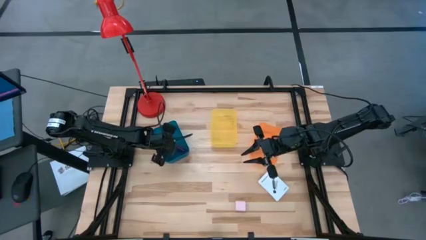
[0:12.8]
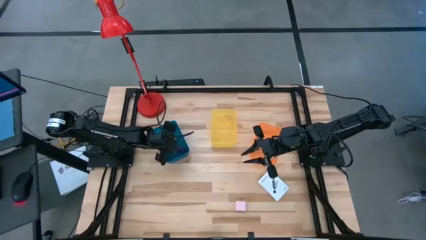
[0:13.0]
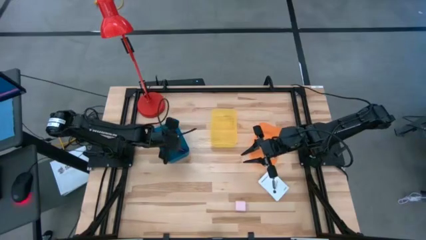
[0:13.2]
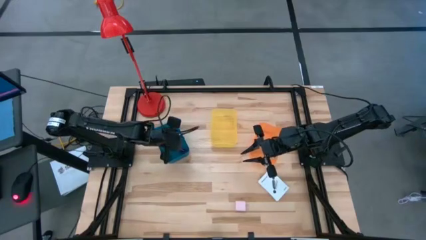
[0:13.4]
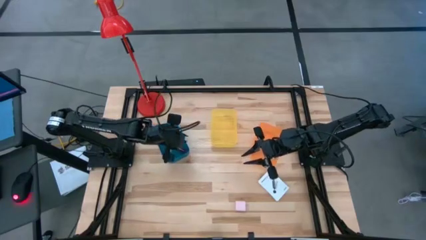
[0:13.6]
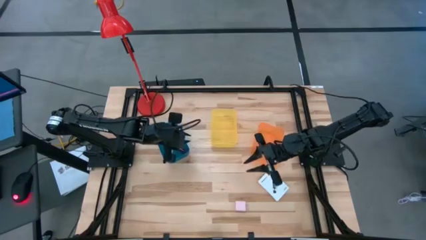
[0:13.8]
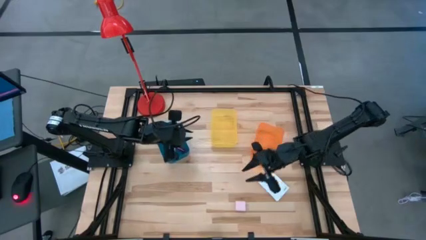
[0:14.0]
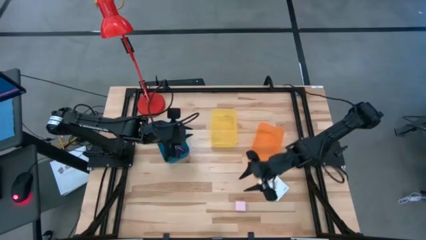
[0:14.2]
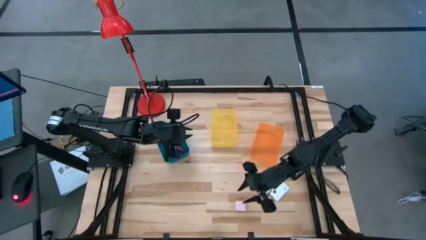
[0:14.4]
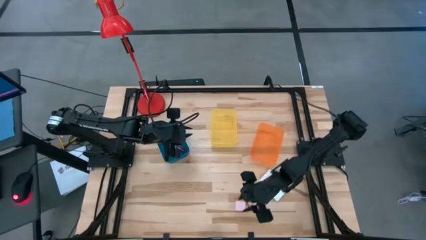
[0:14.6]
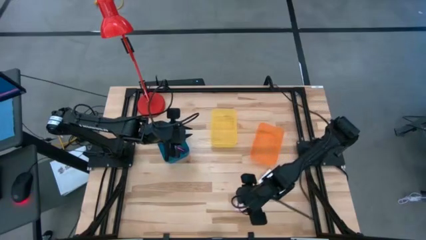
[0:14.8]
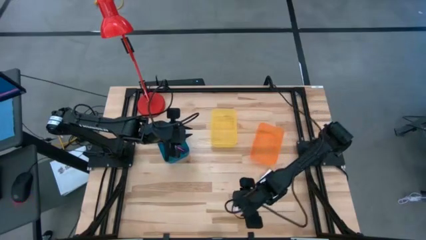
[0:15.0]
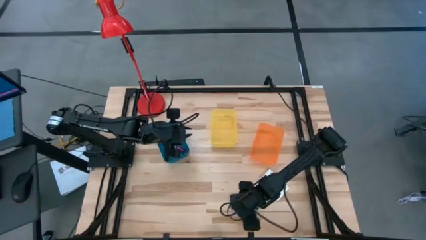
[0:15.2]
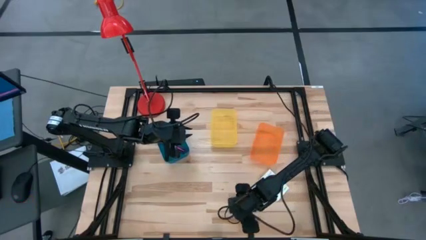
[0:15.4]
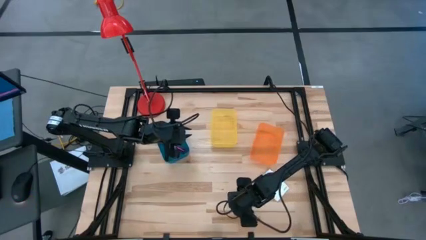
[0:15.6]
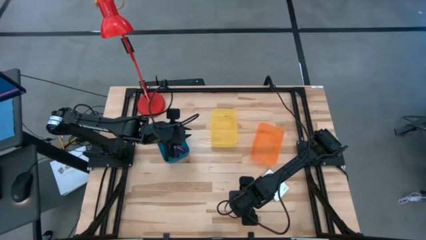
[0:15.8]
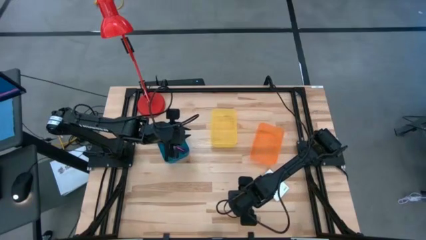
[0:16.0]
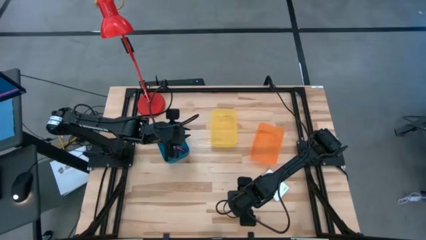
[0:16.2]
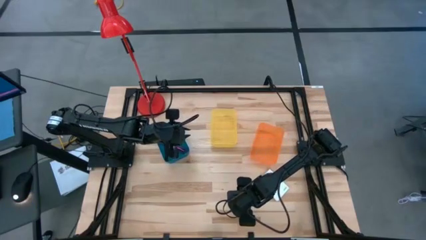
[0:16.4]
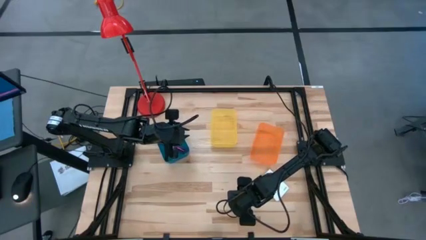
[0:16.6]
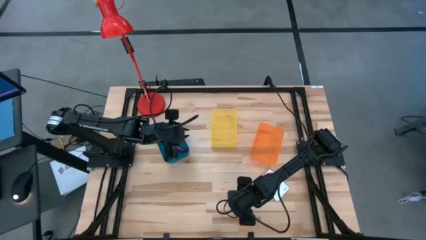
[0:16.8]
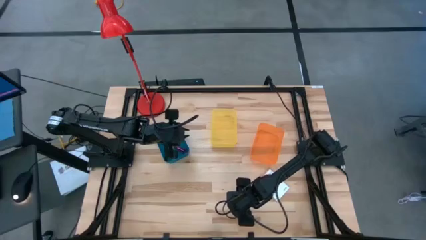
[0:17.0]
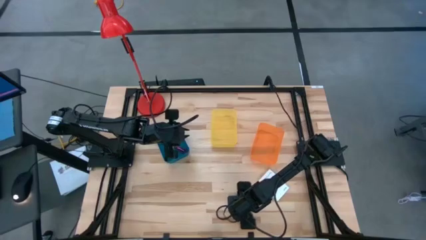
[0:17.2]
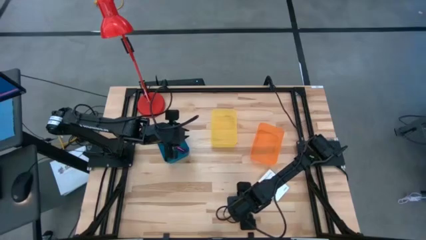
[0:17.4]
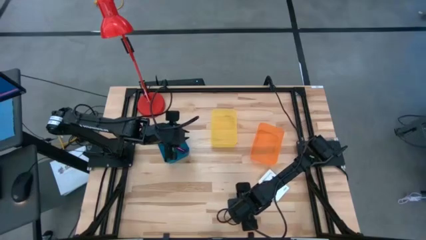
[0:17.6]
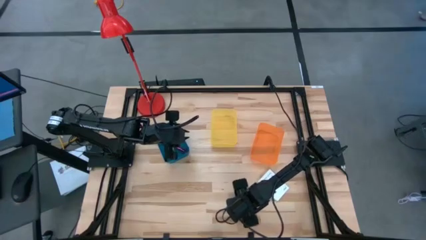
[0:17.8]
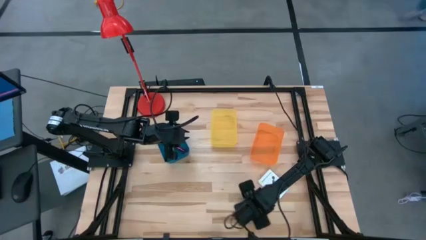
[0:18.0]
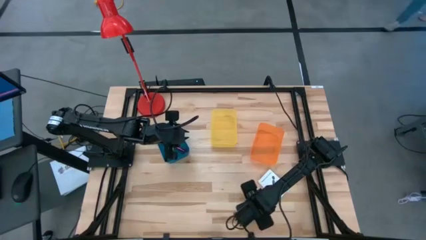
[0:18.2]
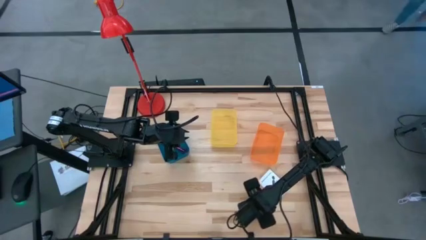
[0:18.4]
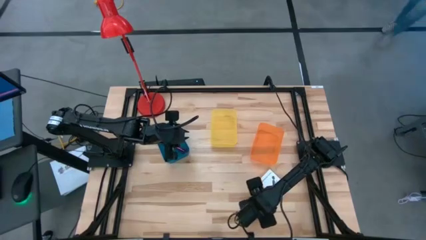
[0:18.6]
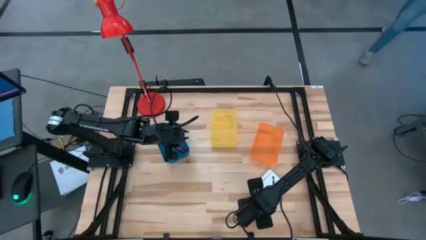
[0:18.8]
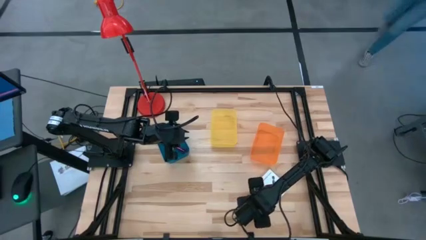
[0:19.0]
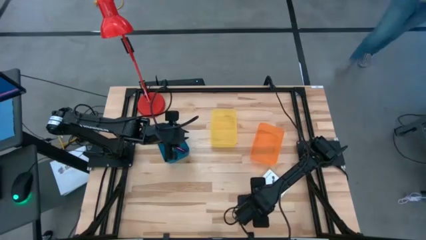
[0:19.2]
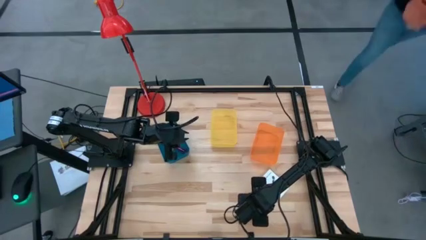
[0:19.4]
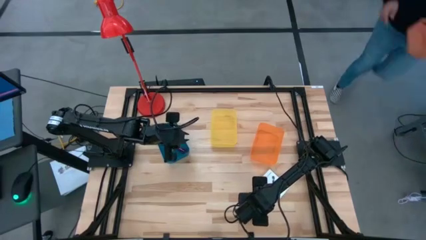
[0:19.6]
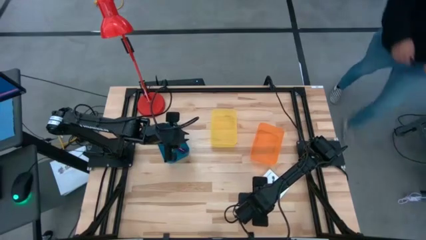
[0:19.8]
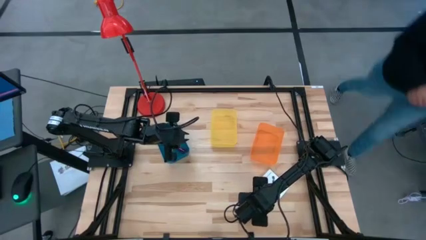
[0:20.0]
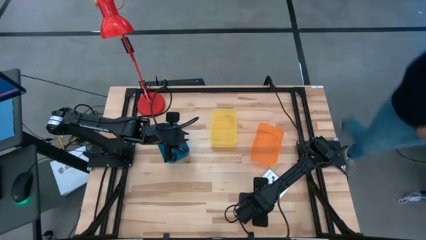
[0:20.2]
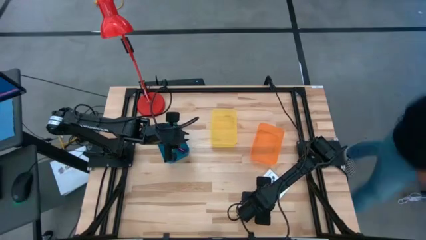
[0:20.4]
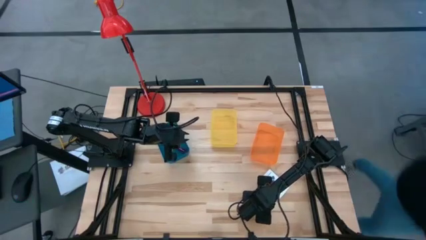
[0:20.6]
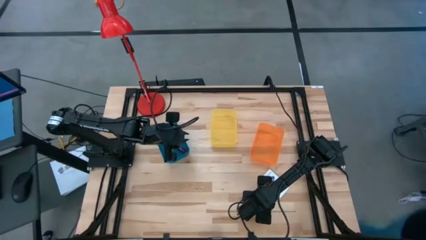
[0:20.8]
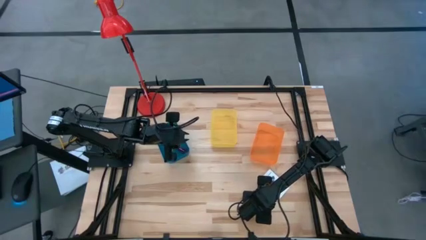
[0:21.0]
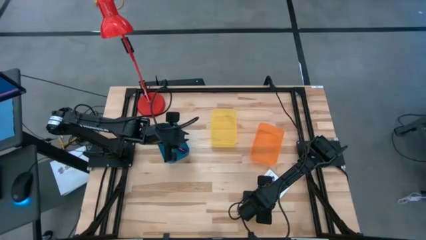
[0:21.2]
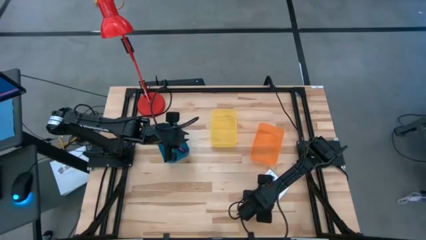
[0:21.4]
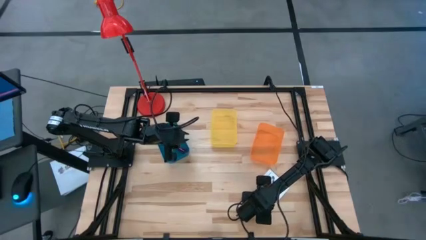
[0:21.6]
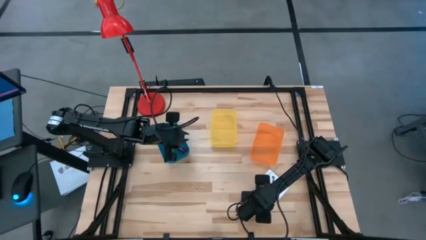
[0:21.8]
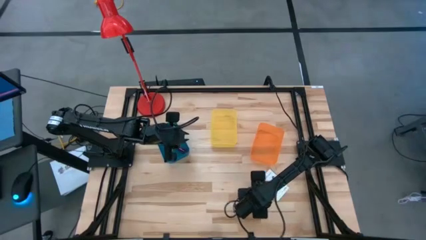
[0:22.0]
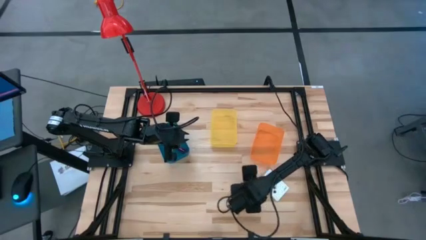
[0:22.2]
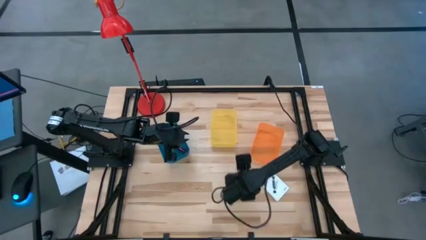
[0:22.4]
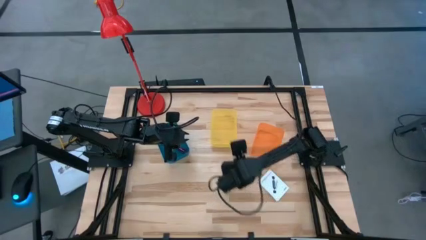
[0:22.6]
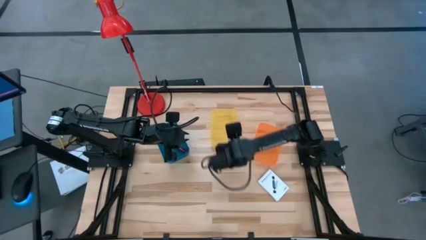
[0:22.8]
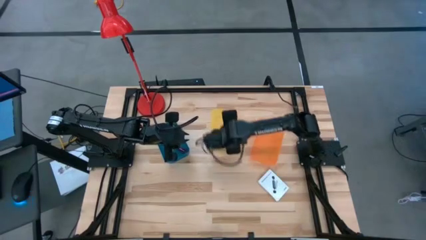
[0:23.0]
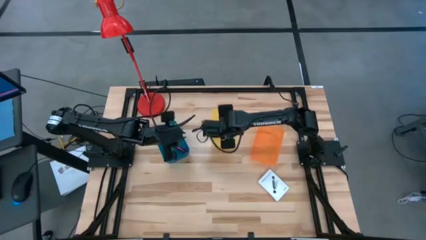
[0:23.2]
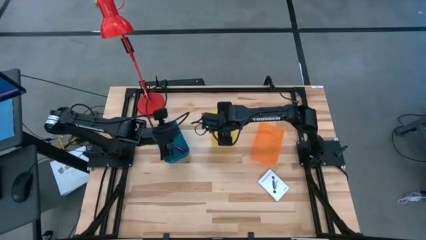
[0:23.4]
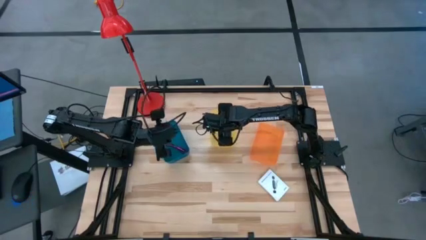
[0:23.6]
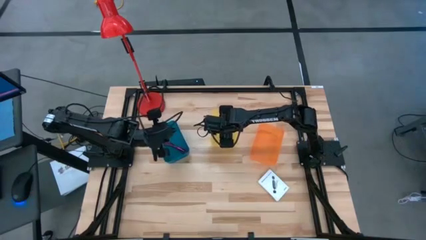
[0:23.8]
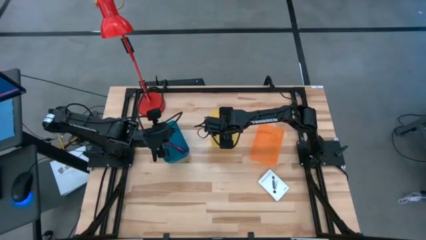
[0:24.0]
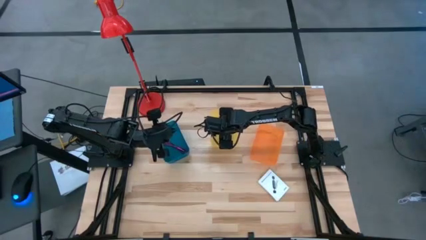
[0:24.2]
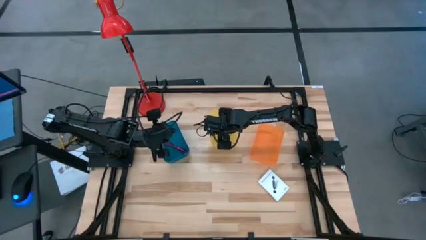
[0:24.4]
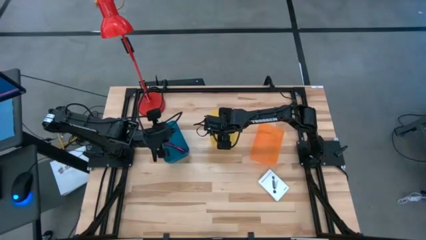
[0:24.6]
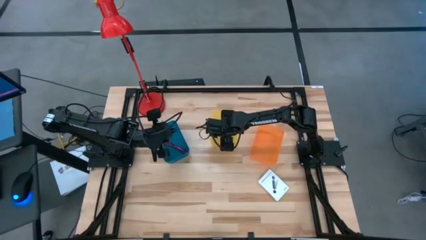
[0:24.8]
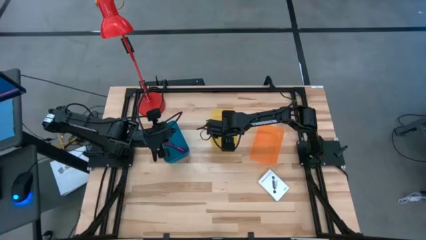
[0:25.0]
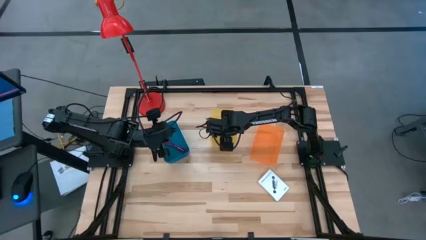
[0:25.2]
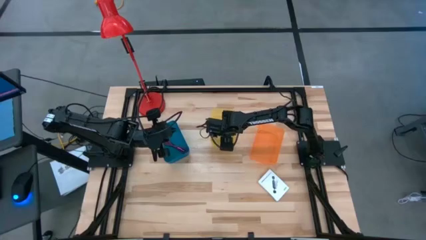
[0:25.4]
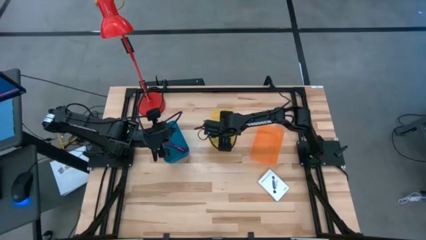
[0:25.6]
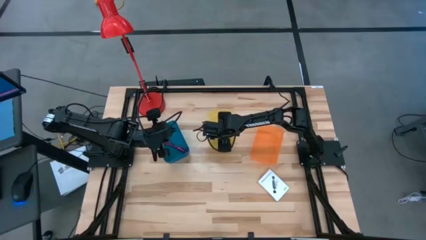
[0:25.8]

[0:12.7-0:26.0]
Task: Pick and place items into bin
Put the pink charger adapter into the yellow bin

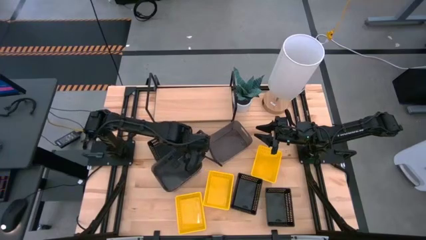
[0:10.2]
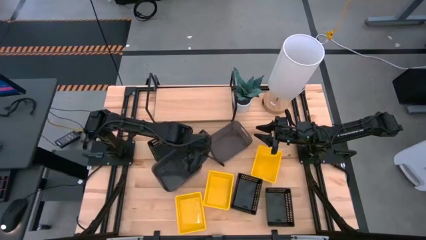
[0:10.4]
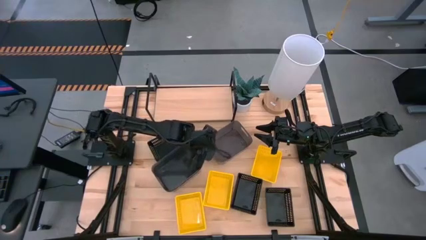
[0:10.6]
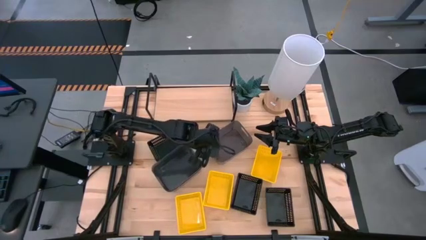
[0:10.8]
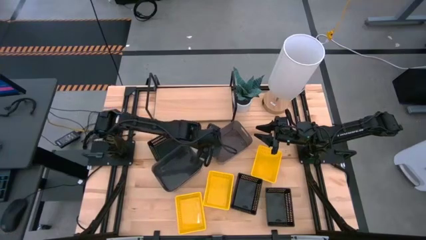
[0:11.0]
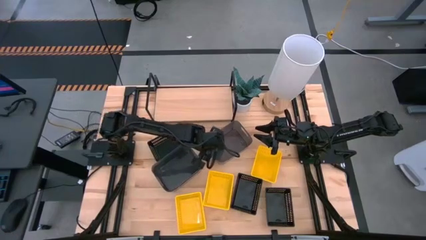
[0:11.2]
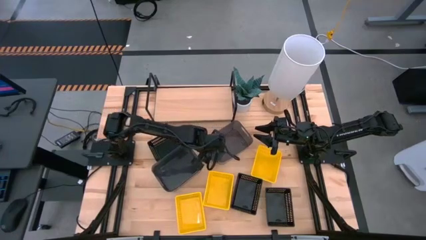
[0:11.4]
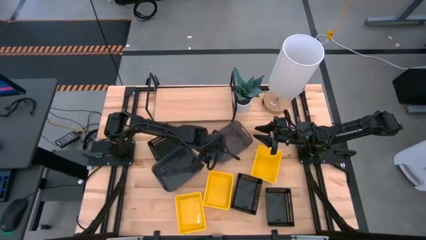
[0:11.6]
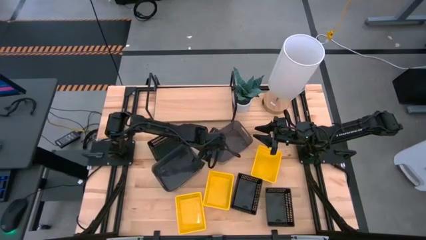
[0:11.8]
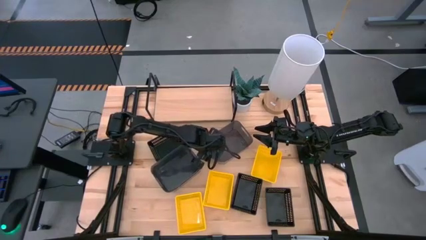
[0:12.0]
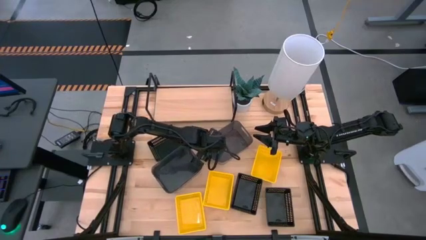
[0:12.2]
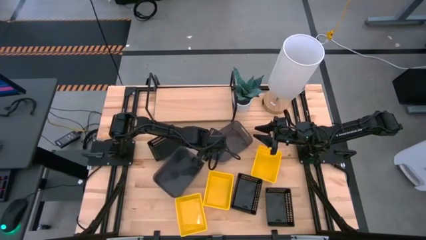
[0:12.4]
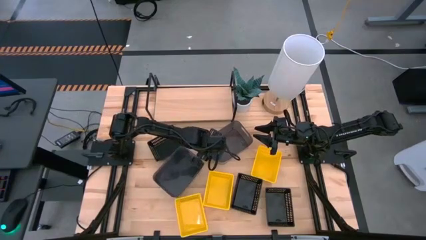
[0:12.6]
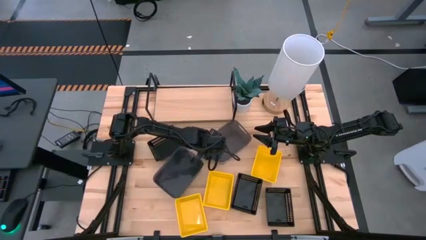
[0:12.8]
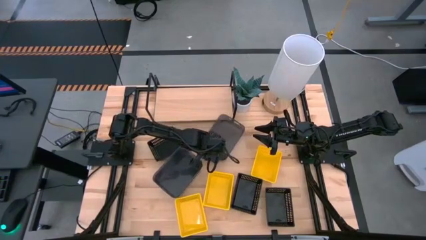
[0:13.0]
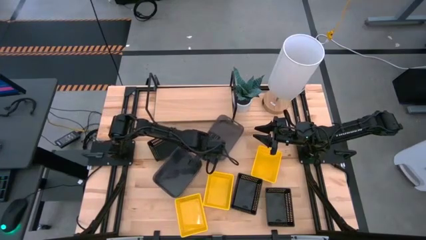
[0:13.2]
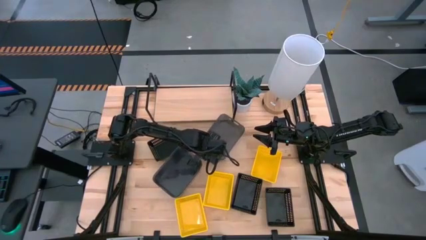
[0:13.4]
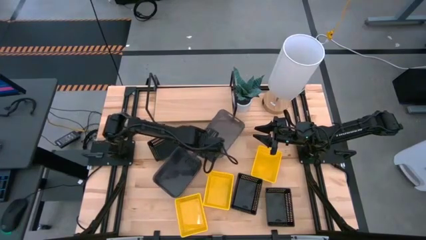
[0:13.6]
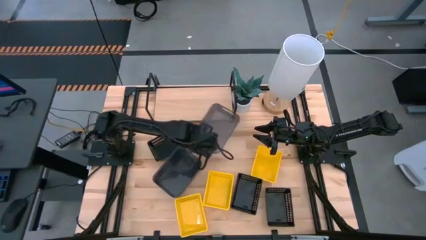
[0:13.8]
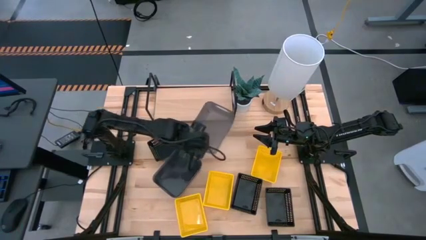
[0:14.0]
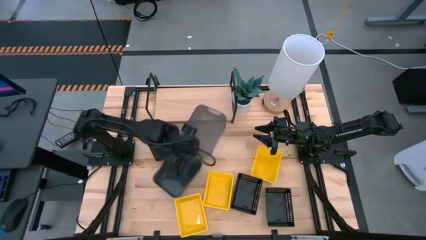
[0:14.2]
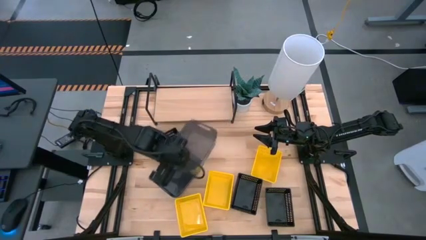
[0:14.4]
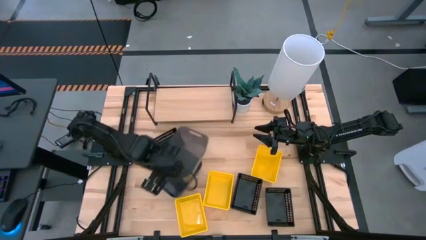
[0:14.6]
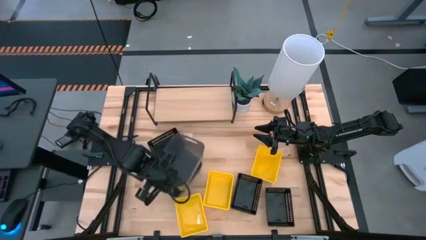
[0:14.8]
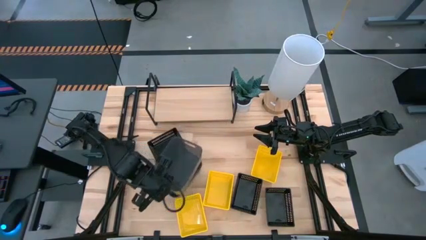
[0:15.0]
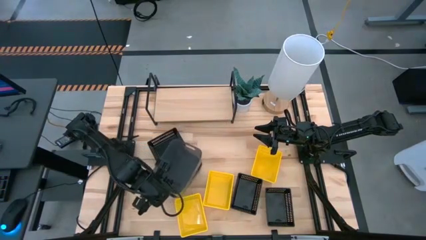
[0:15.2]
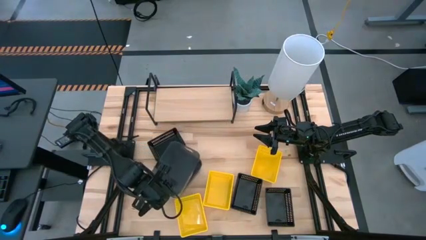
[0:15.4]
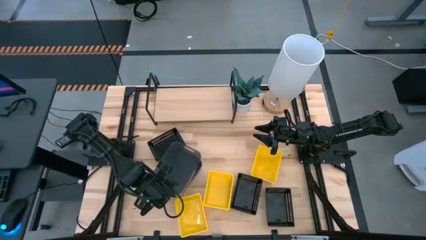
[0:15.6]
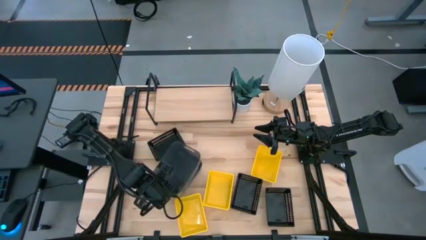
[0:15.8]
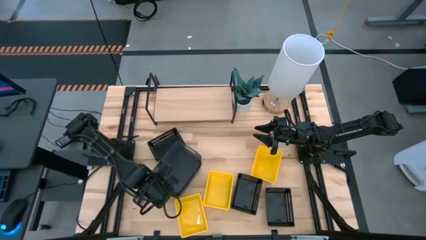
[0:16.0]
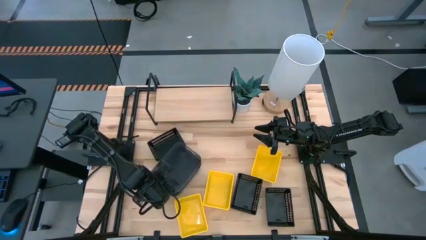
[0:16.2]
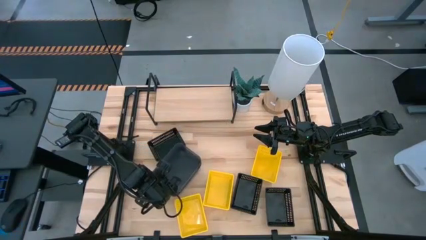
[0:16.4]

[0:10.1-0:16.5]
Task: Stack baskets on shelf by color
Stack the right transparent black bin on top of the transparent black stacked bins
